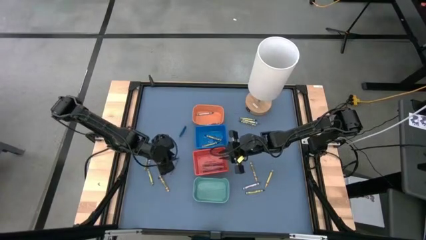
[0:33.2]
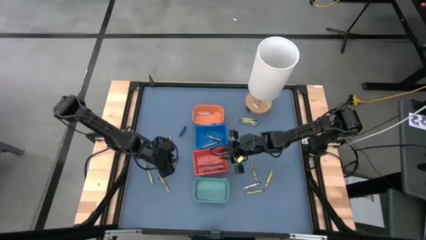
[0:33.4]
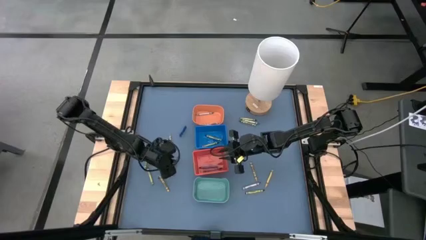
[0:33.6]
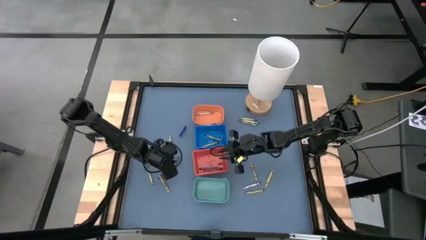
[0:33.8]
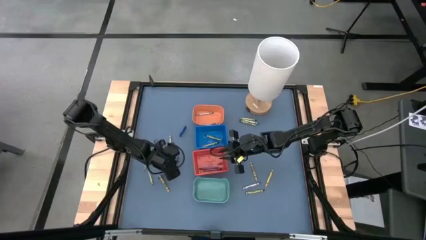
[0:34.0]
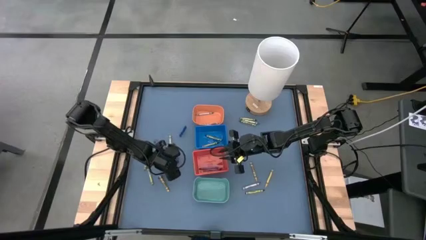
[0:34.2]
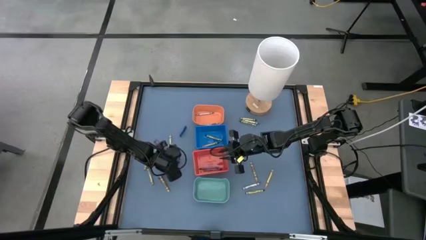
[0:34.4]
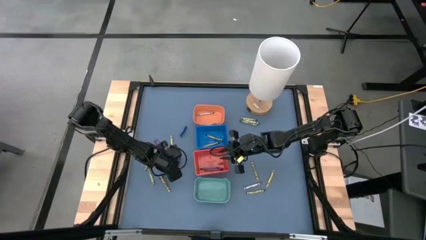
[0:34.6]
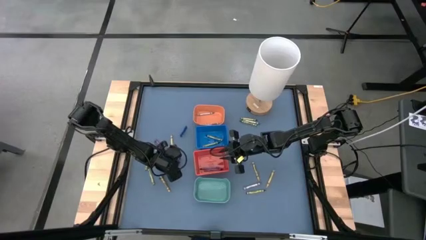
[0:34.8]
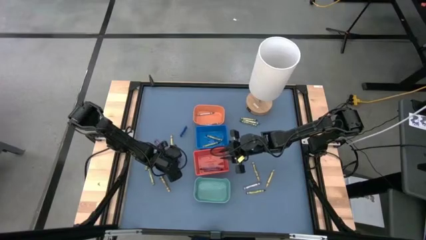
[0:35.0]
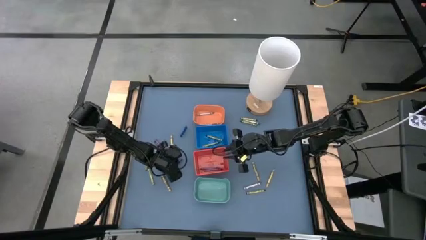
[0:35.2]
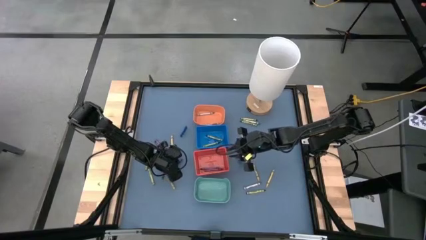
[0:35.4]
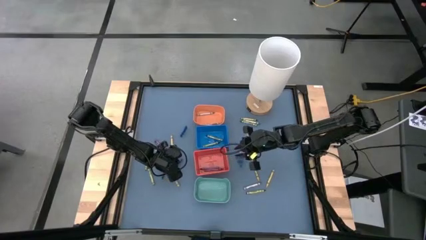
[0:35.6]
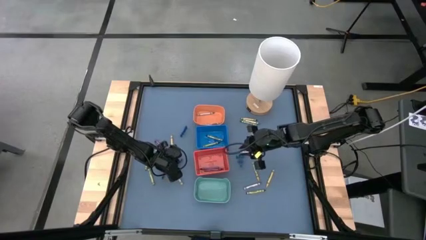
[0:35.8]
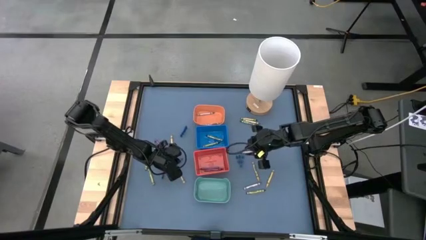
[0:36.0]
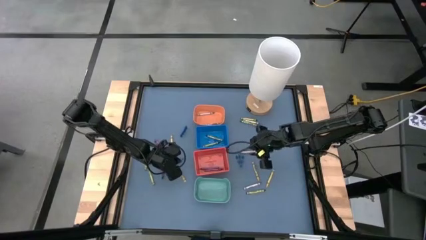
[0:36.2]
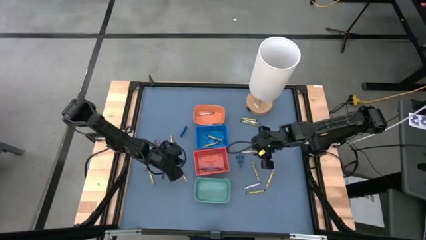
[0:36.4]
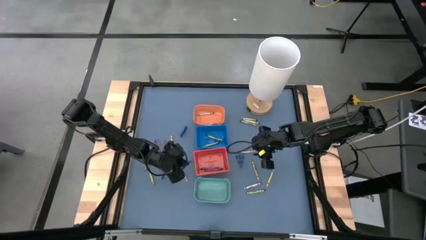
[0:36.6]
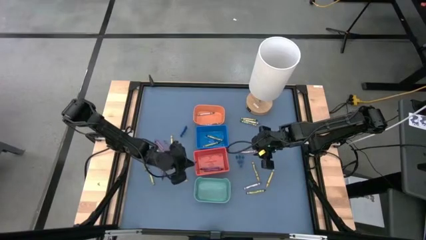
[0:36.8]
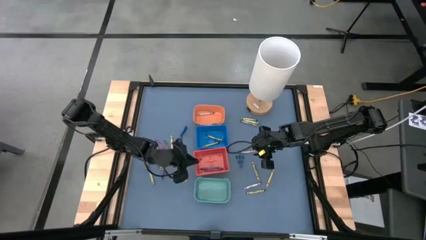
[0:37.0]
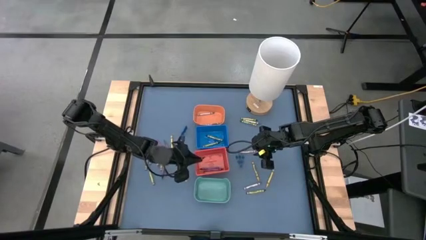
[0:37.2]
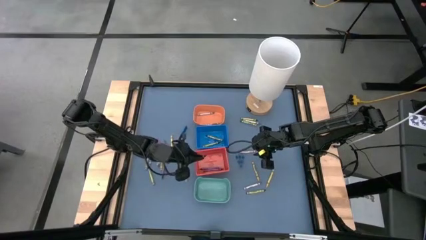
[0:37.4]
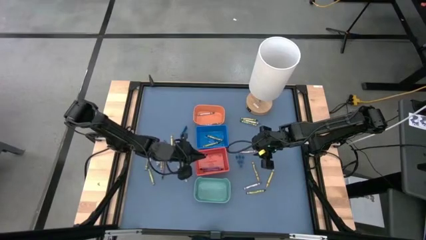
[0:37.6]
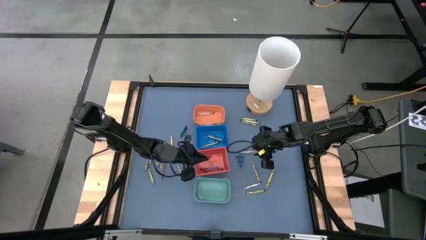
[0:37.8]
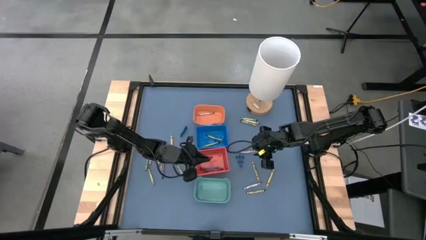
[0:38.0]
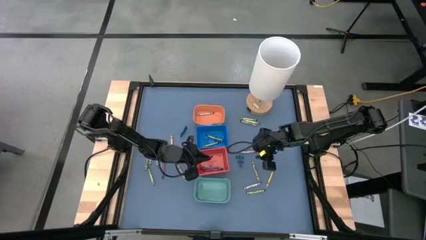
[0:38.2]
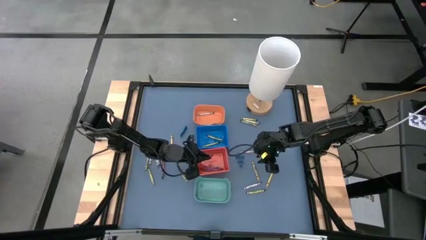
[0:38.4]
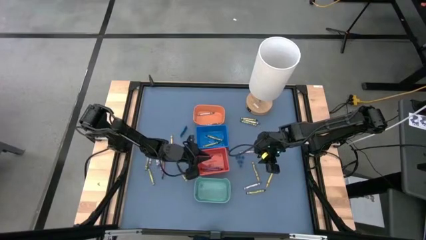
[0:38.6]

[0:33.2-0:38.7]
Task: Sort crayons
Put the purple crayon into the red bin

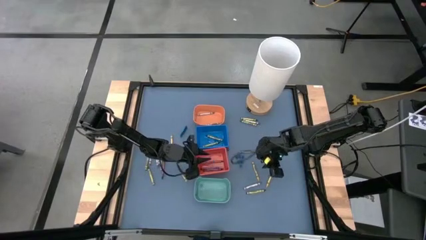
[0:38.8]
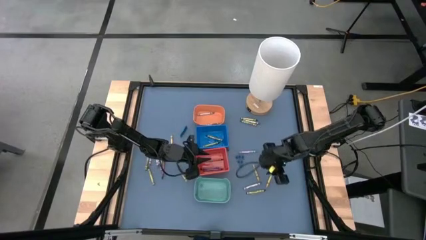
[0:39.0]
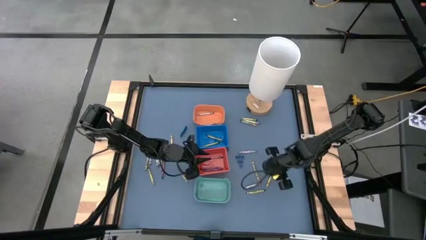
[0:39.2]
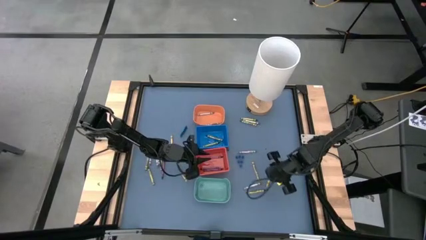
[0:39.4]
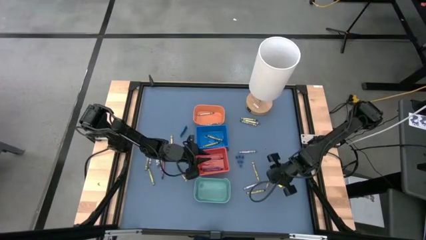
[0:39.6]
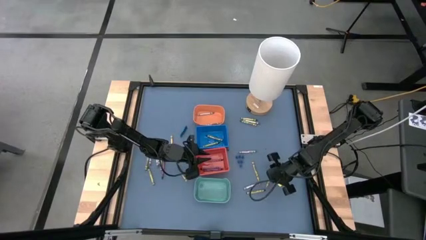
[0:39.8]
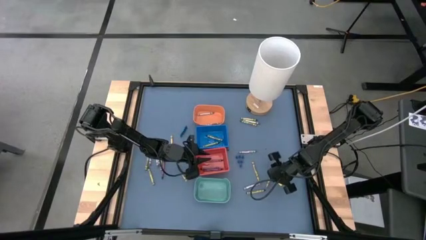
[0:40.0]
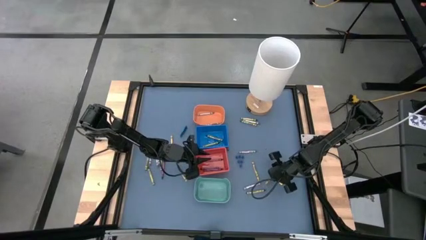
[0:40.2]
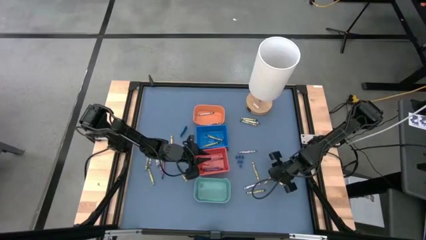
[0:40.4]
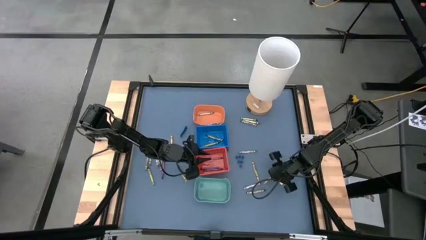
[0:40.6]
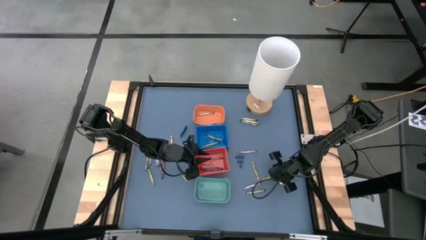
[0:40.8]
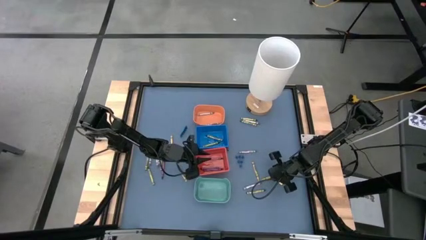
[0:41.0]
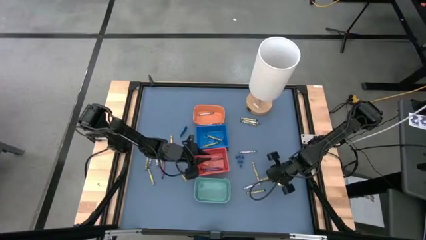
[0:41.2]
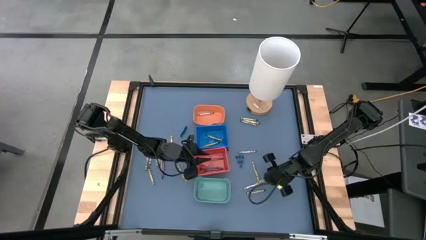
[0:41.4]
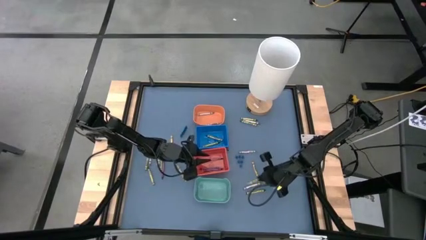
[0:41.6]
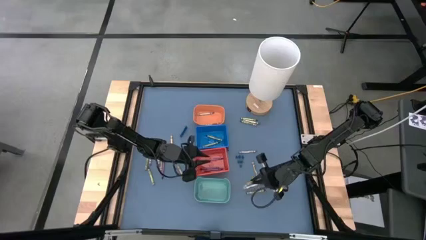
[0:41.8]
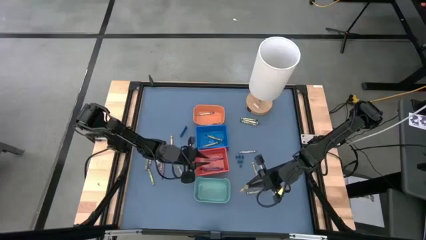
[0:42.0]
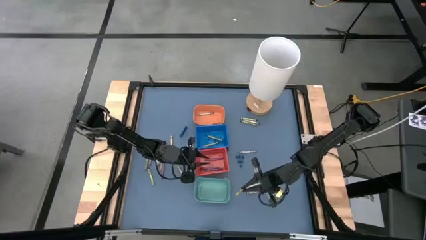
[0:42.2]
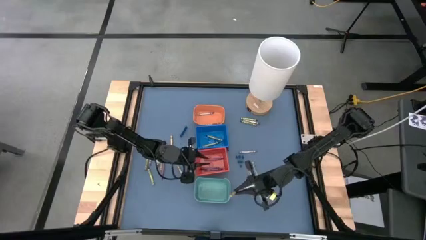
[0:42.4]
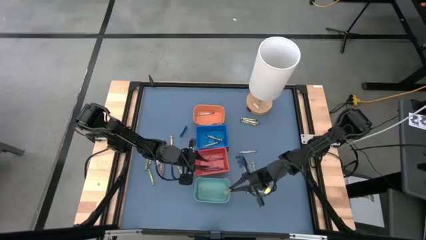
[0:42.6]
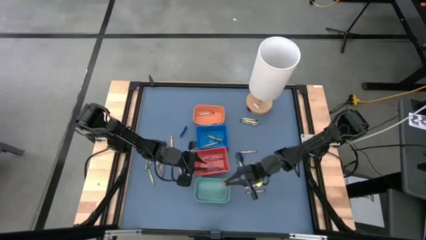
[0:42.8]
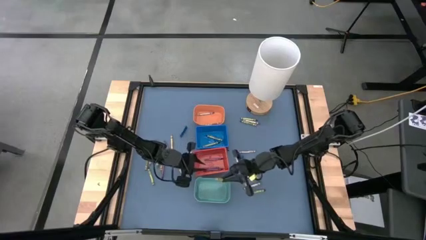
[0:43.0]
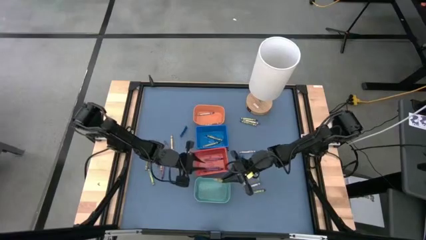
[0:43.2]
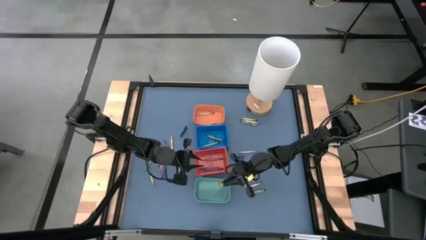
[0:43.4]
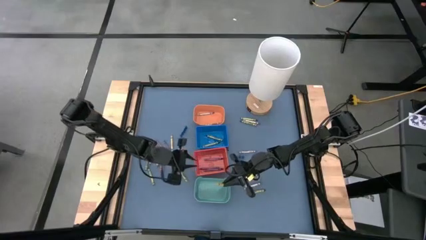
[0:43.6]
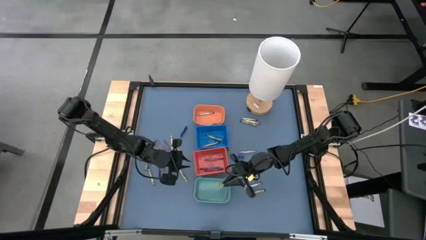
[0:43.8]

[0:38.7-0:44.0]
Put the yellow crayon into the green bin

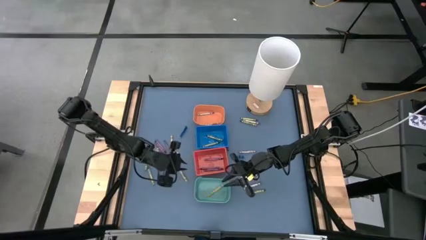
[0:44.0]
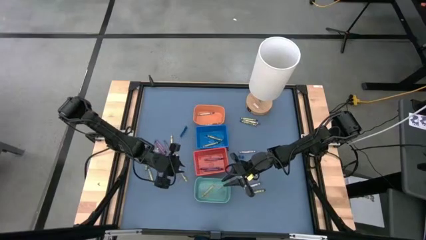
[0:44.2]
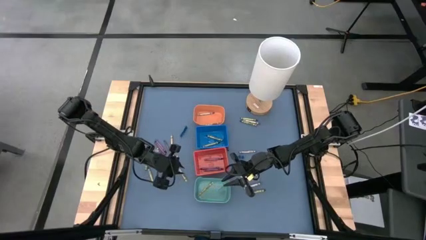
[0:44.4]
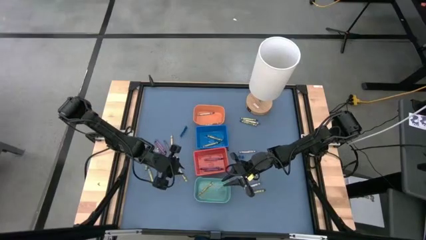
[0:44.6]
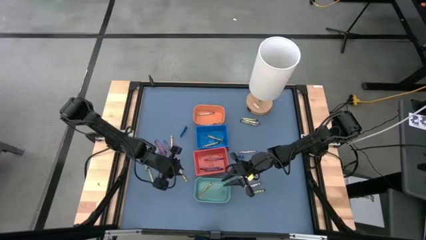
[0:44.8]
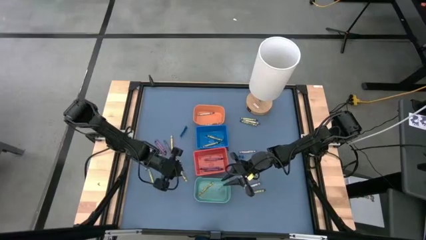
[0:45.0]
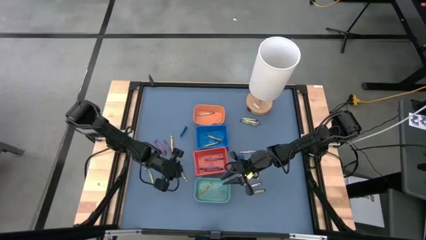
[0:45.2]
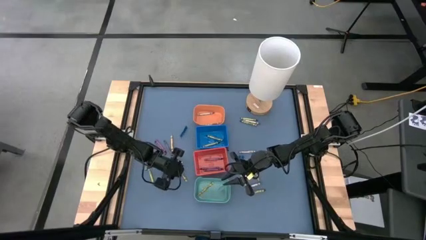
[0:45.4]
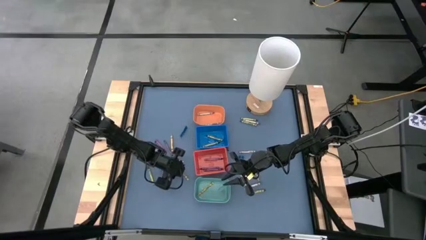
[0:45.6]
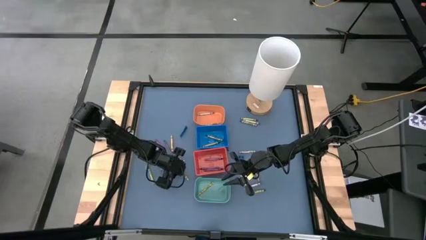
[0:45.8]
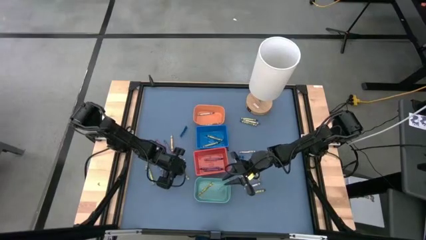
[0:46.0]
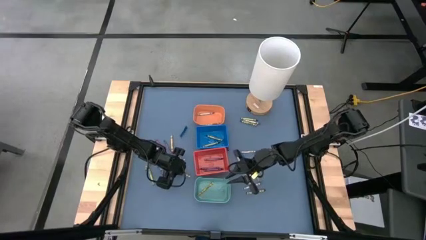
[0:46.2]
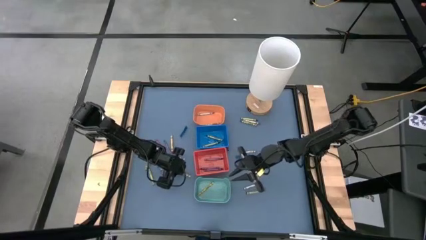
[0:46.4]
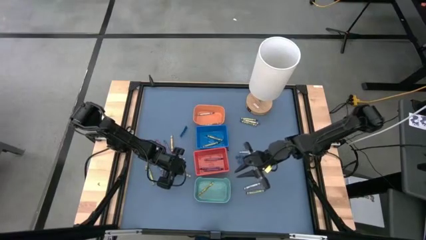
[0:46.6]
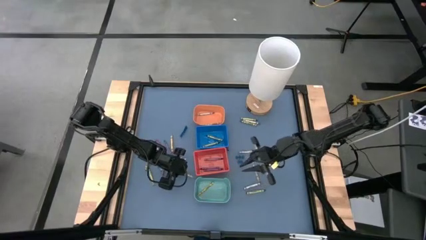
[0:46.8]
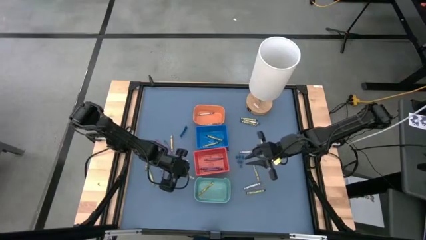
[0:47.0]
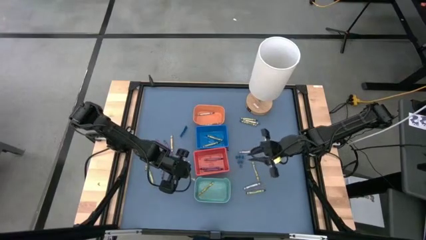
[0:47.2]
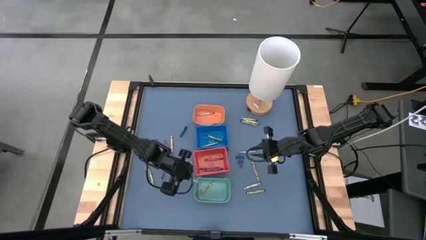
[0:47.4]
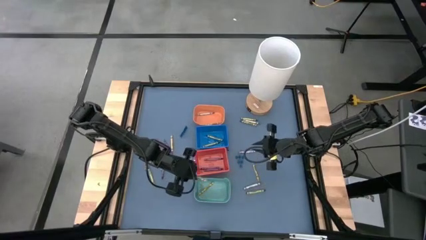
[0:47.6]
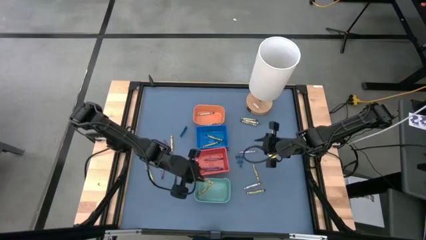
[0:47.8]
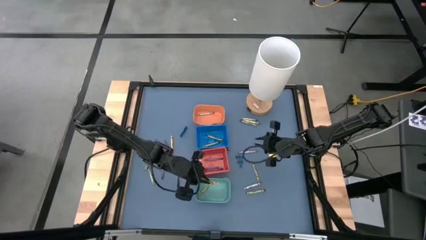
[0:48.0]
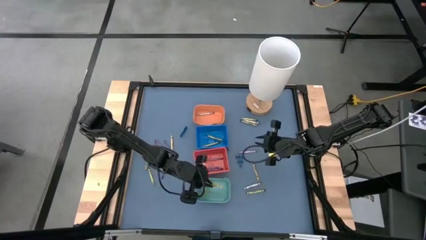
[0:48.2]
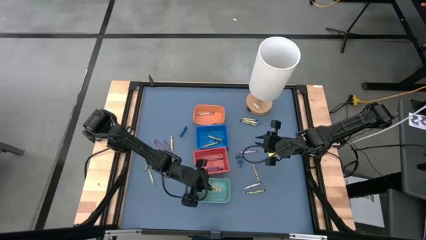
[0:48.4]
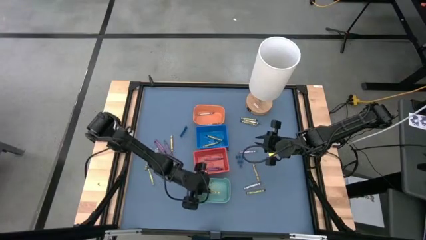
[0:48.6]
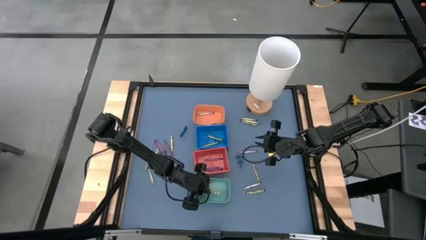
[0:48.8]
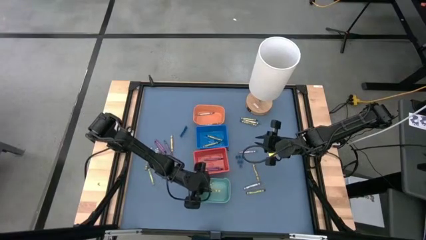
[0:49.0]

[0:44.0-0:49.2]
Put the yellow crayon into the green bin
